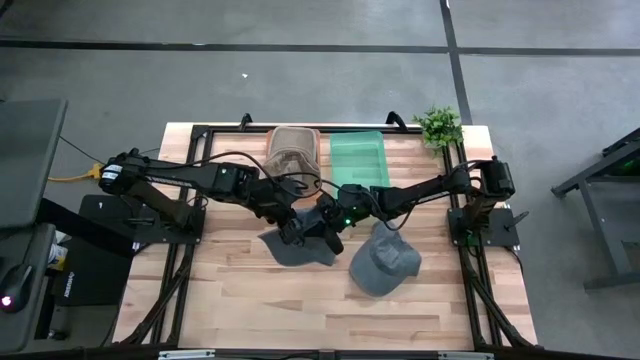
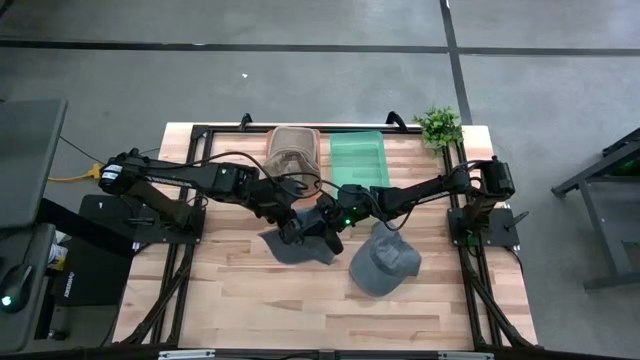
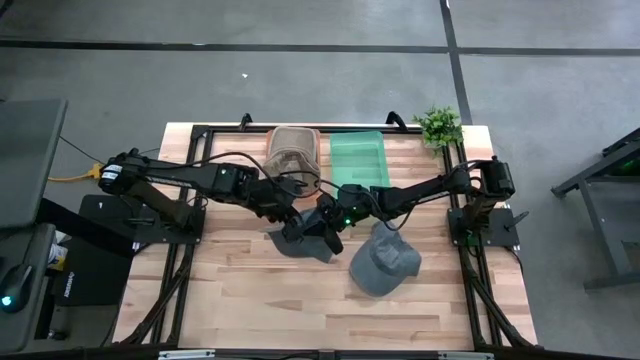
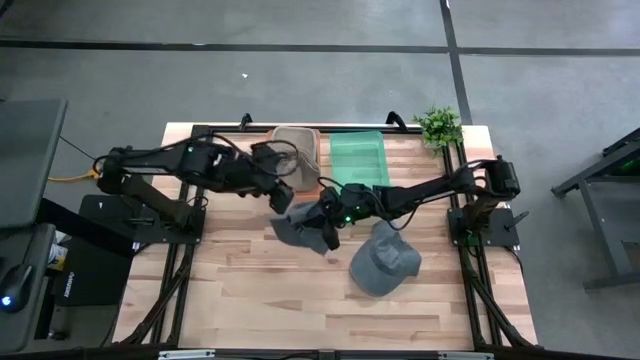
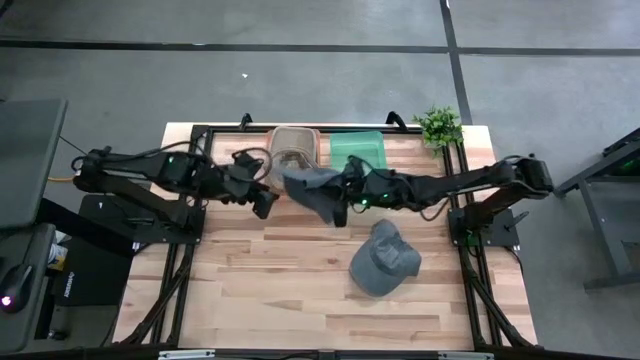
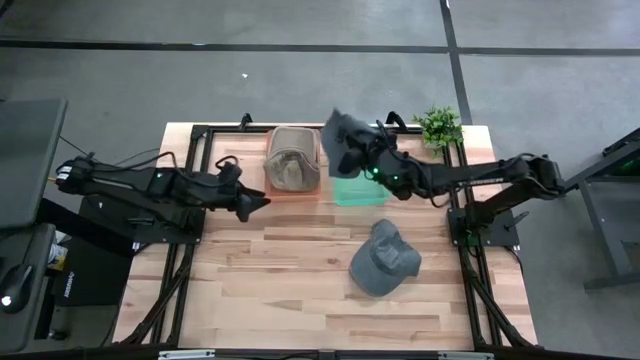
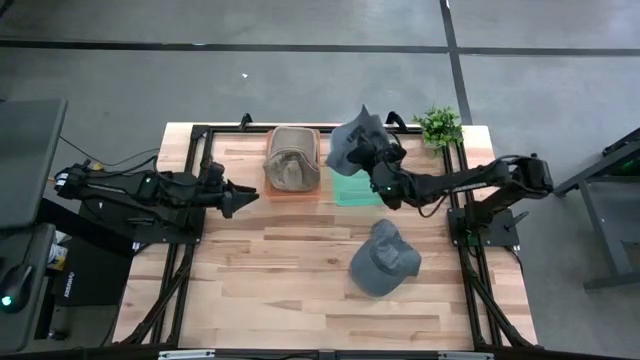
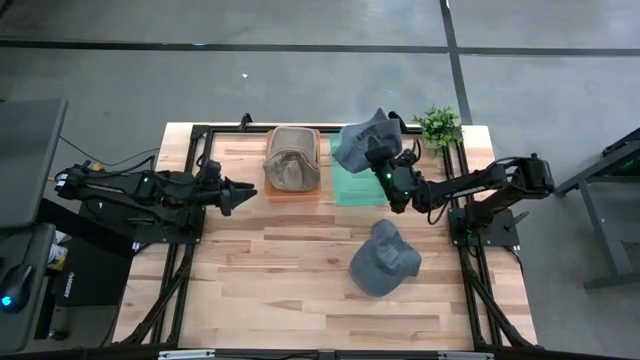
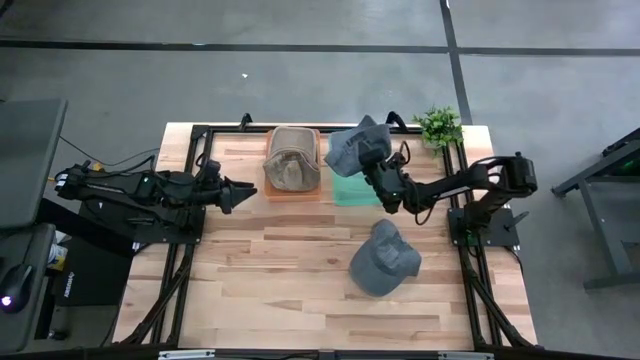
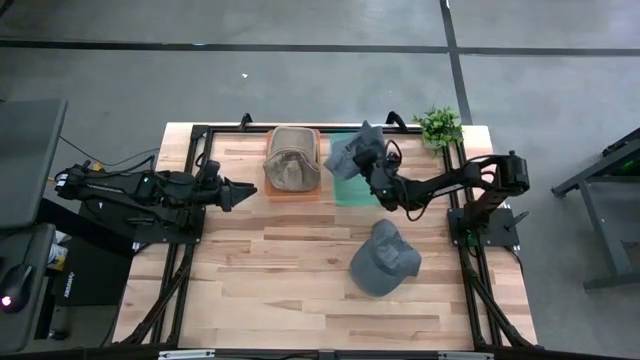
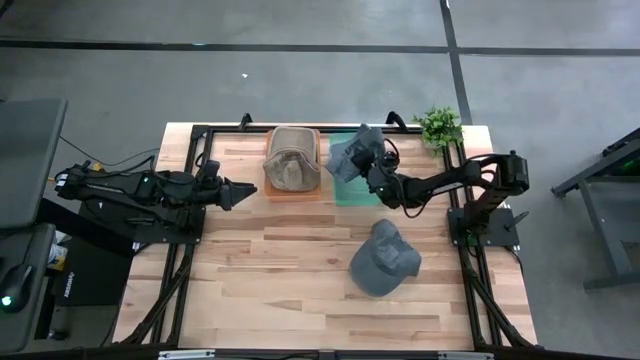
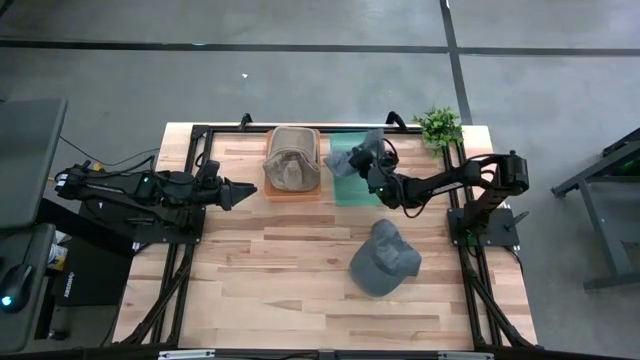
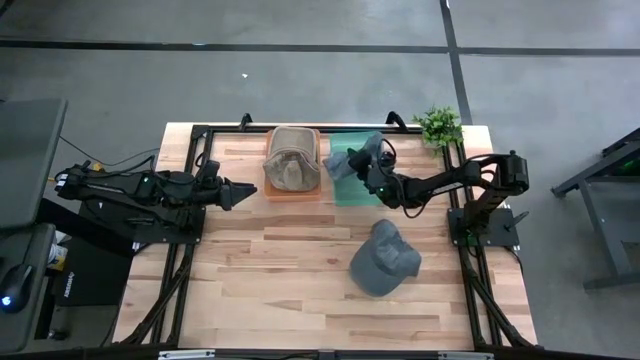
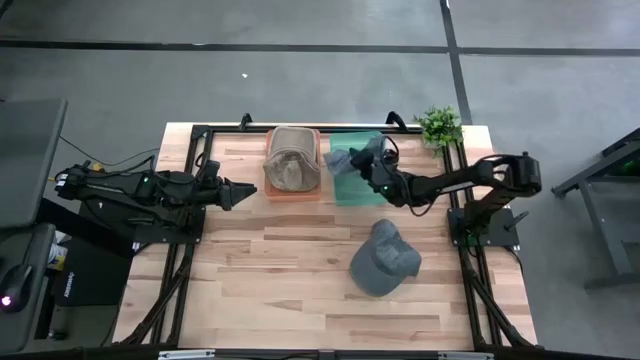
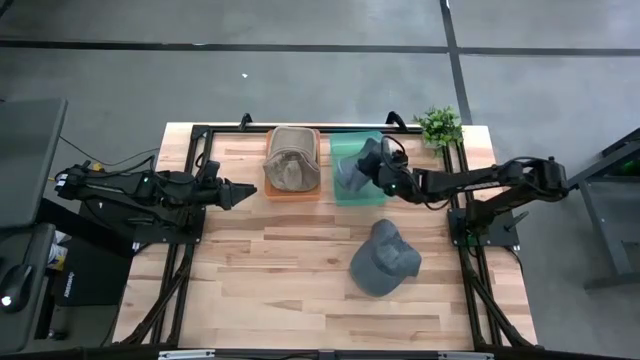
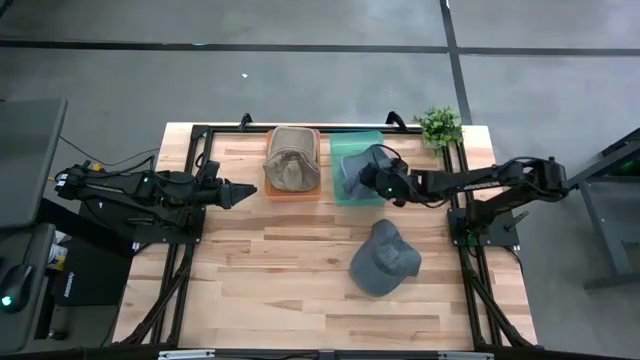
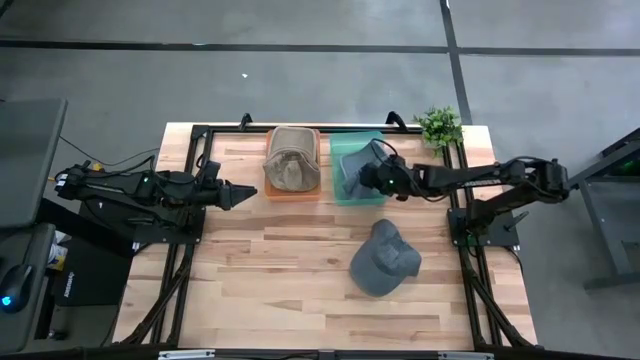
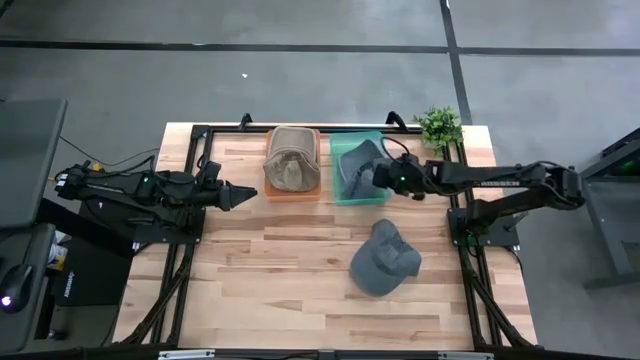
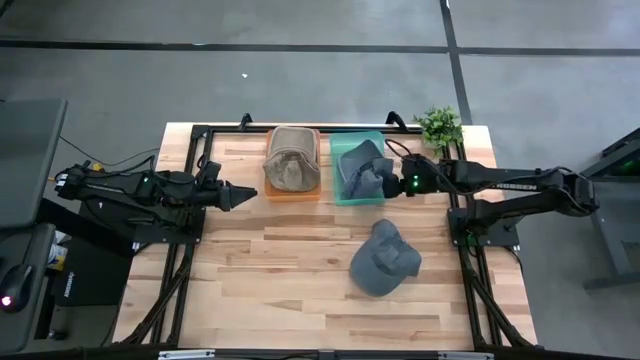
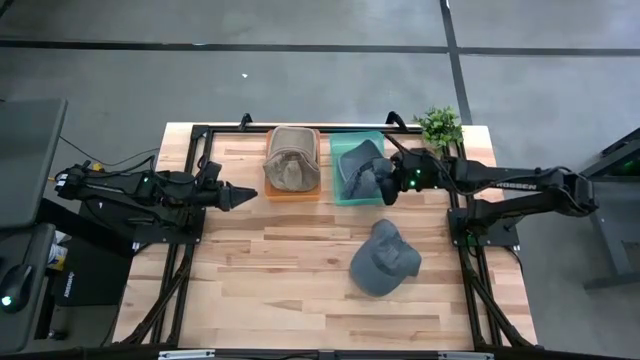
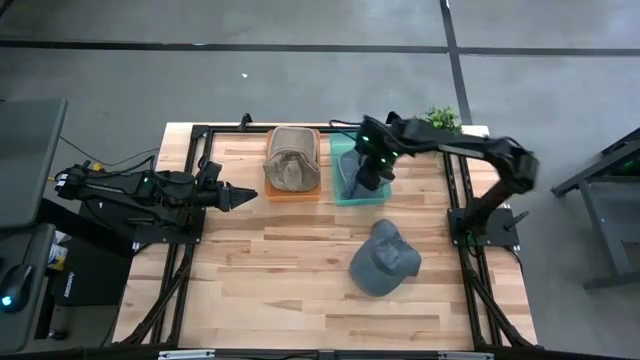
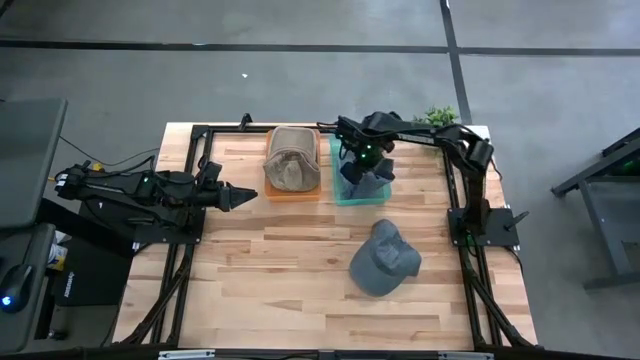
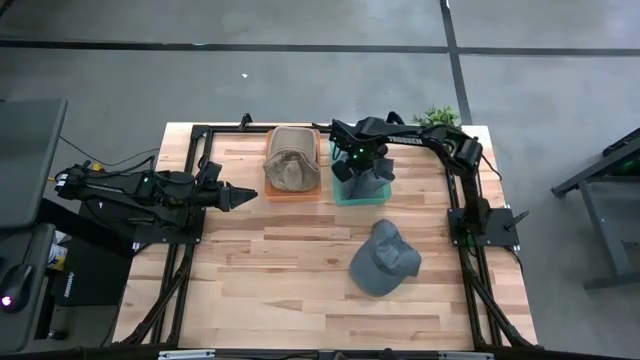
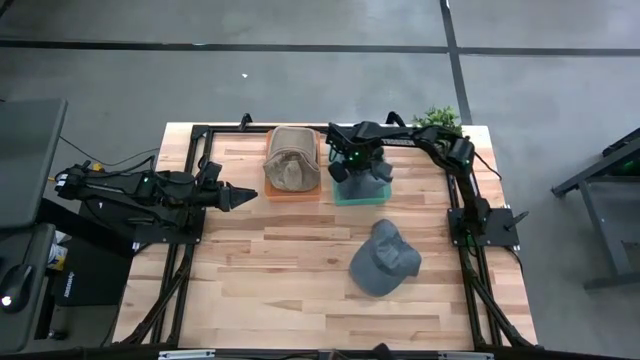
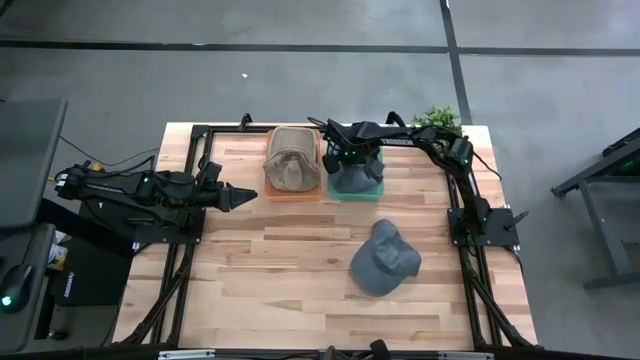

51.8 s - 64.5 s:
Task: Pick & Place hat
Put the left black cap into the blue bin

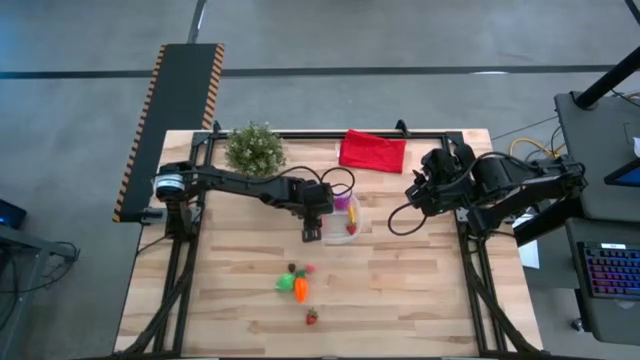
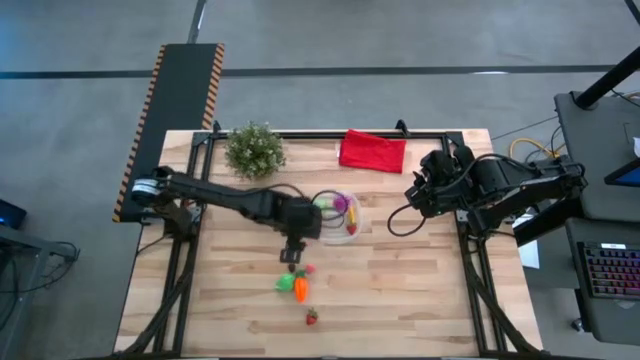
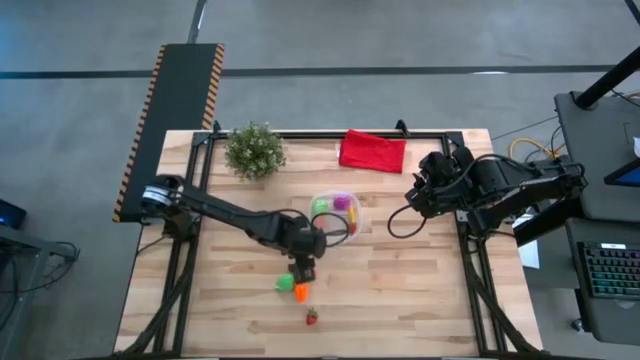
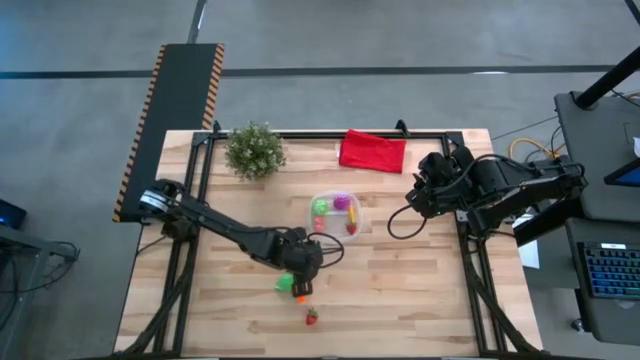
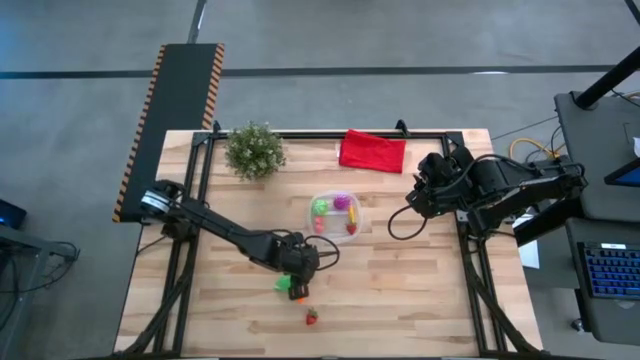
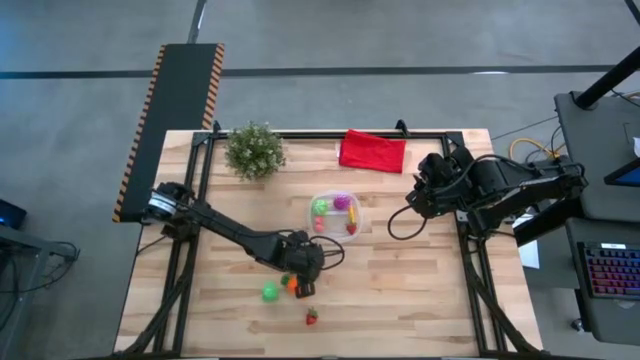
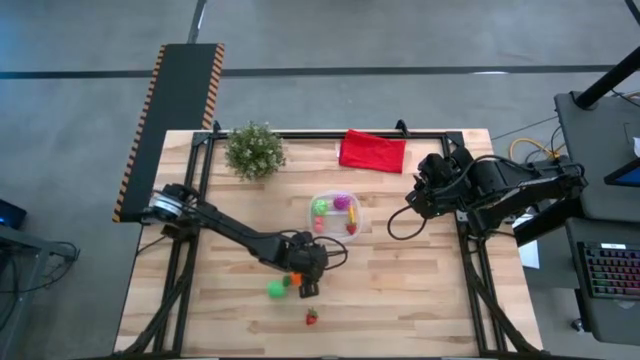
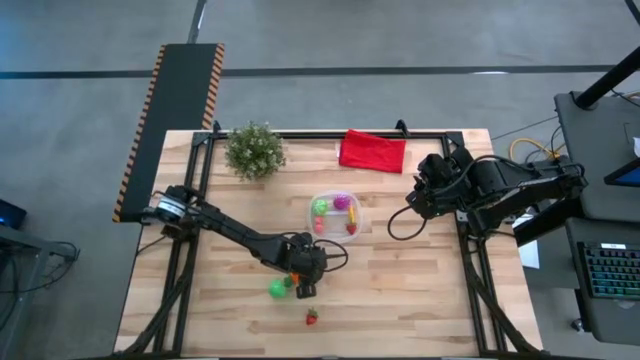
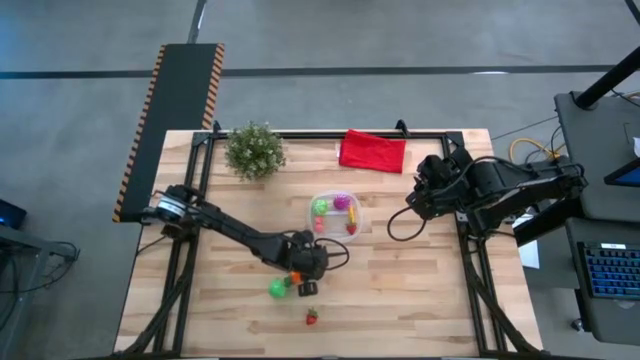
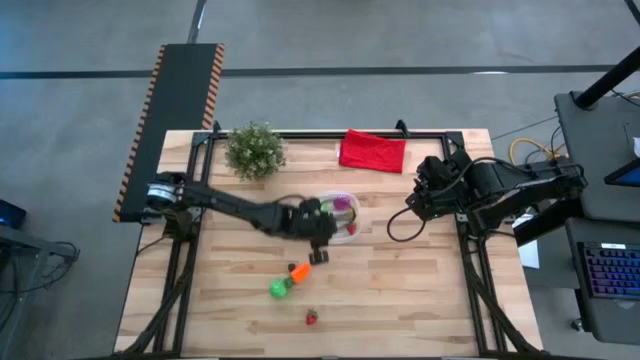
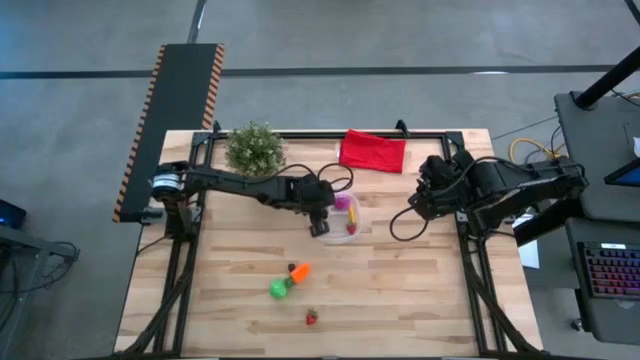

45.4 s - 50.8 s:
Task: Pick and placing Produce into tupperware
Put the pink peach into the transparent container

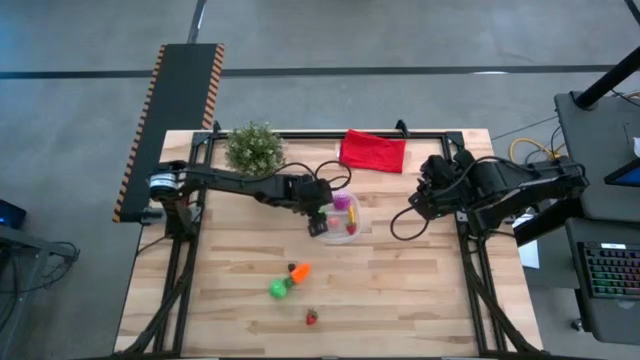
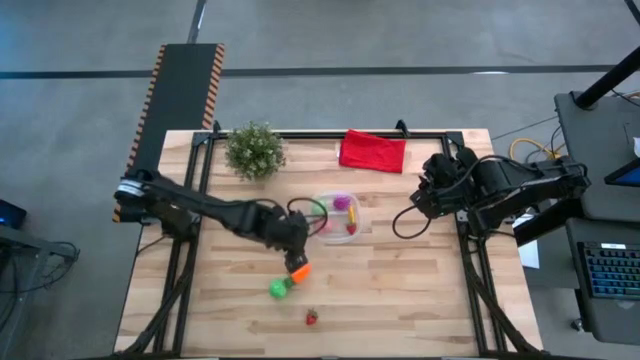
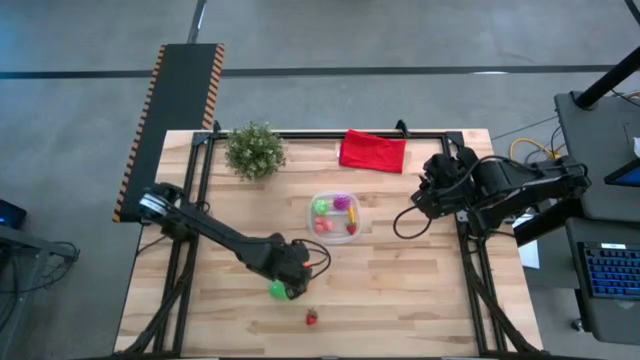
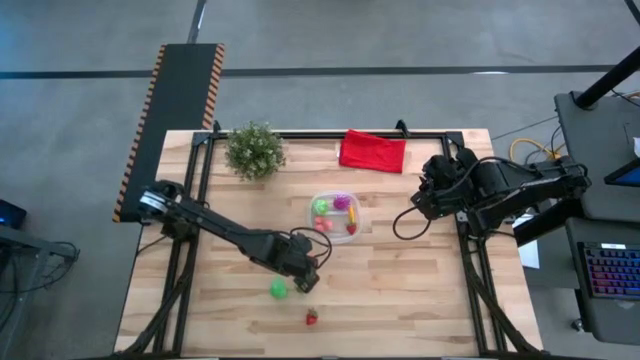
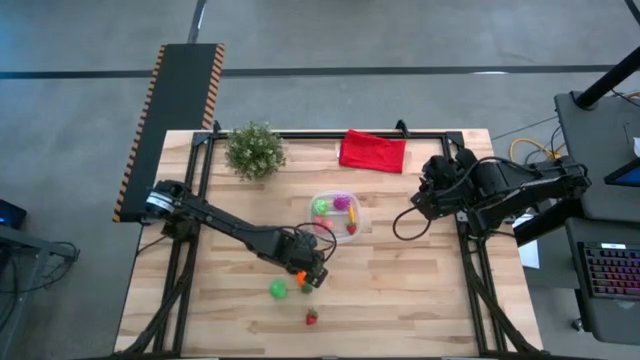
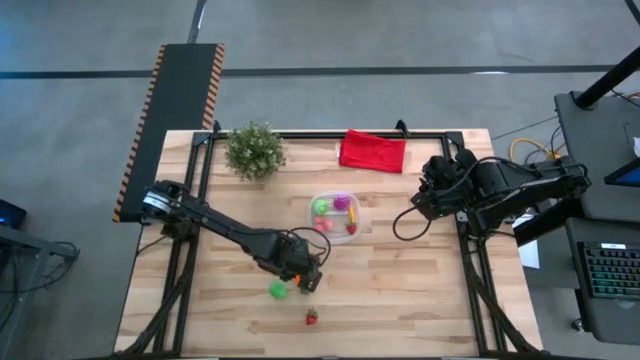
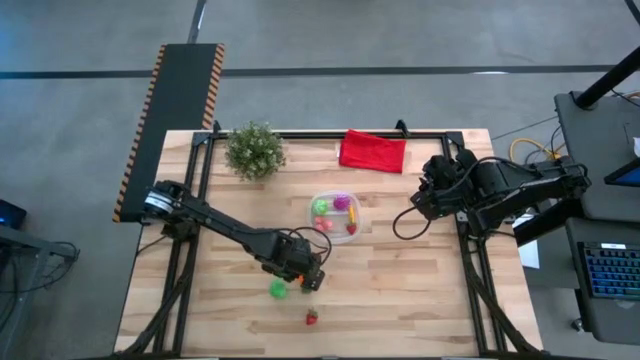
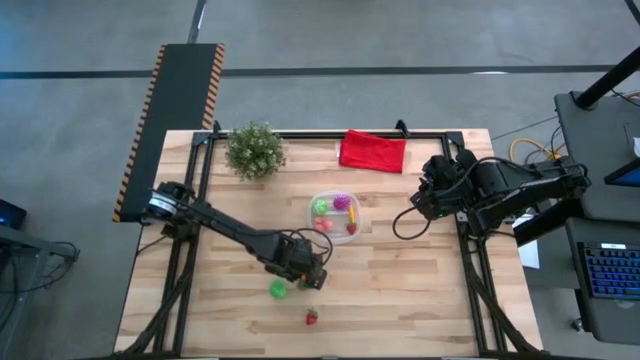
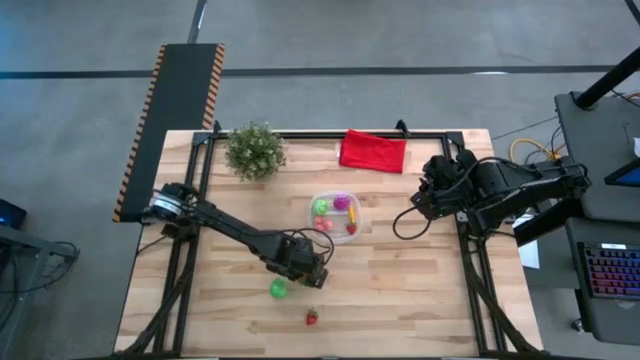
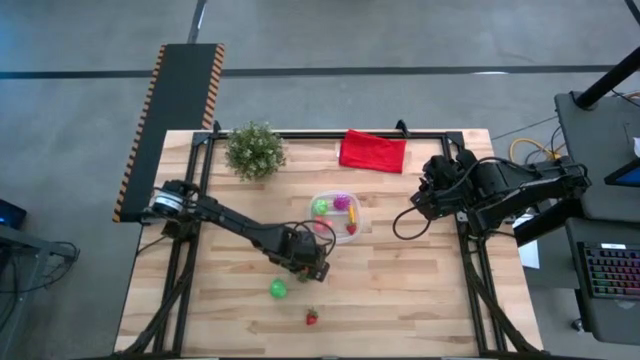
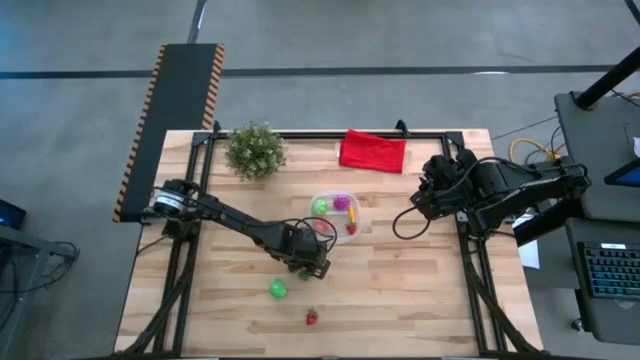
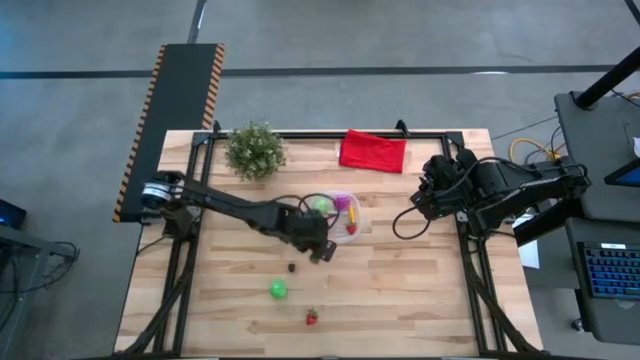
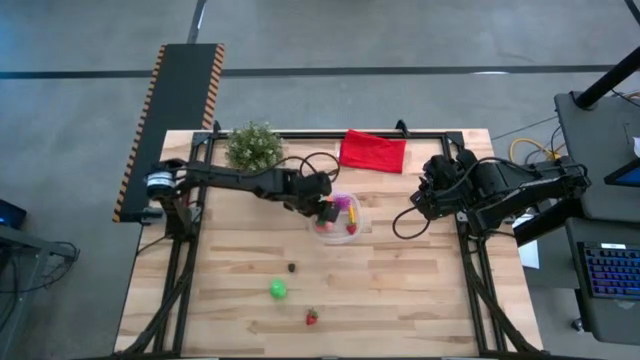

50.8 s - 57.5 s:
Put the orange carrot into the transparent container
